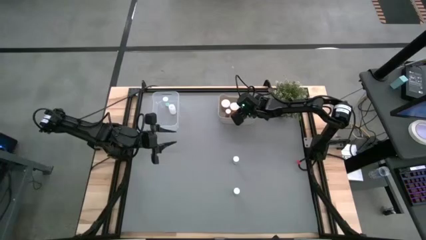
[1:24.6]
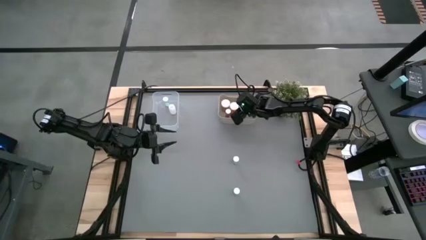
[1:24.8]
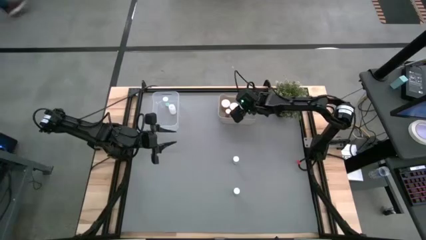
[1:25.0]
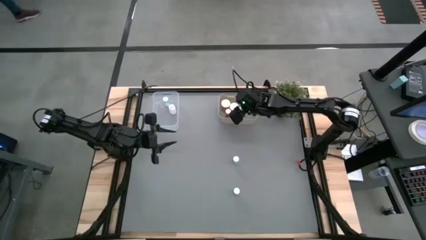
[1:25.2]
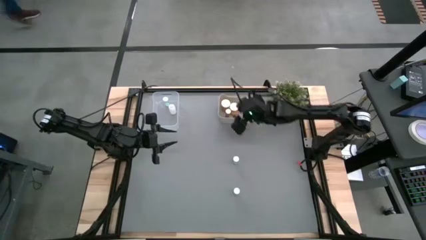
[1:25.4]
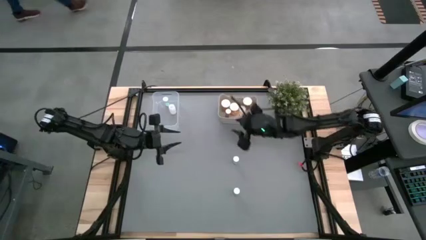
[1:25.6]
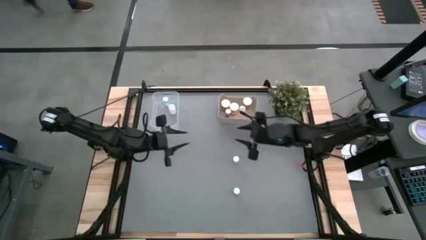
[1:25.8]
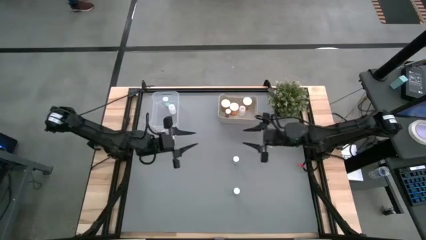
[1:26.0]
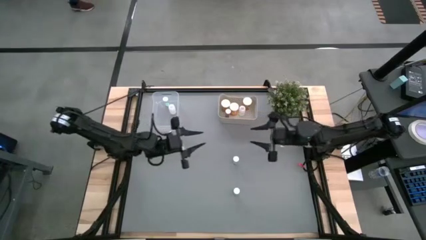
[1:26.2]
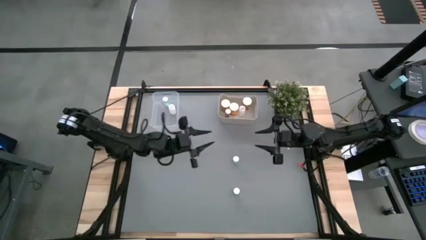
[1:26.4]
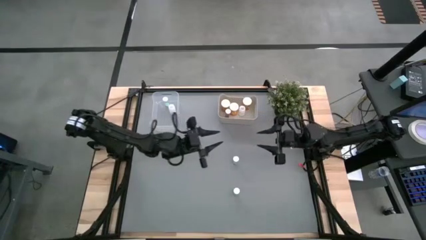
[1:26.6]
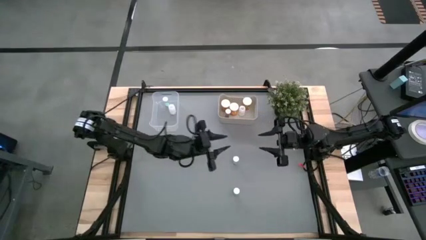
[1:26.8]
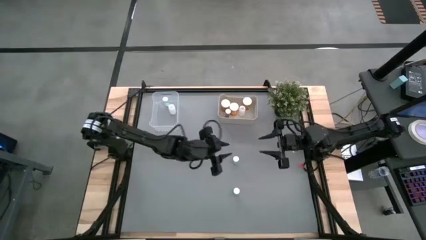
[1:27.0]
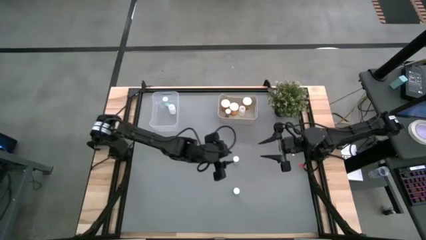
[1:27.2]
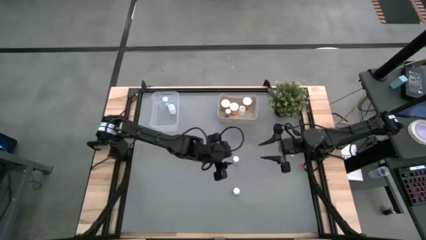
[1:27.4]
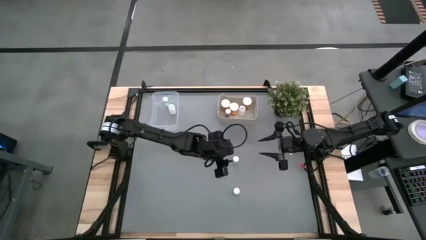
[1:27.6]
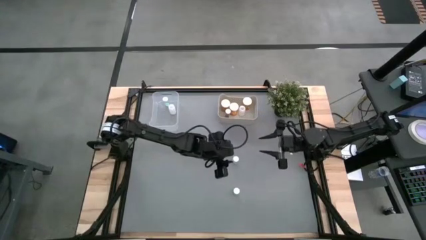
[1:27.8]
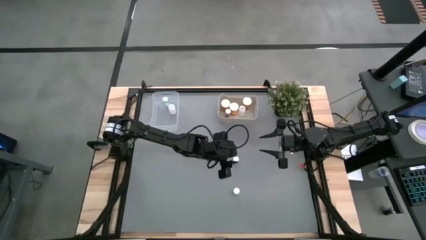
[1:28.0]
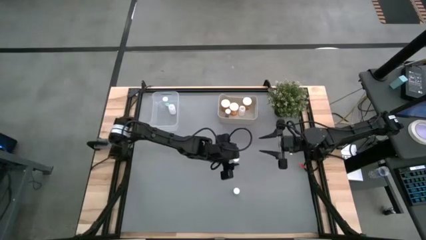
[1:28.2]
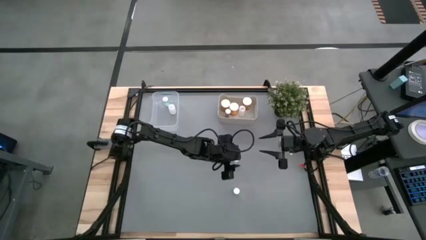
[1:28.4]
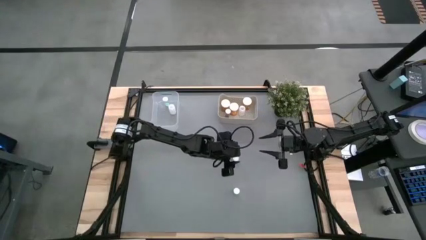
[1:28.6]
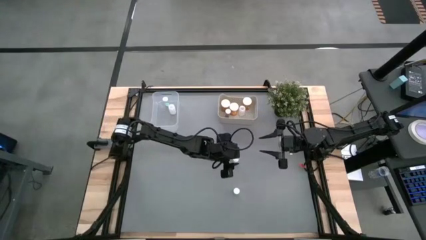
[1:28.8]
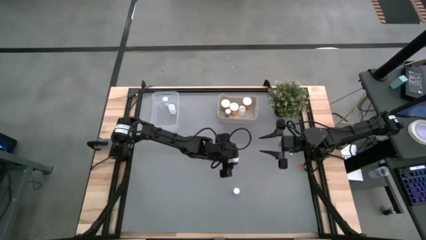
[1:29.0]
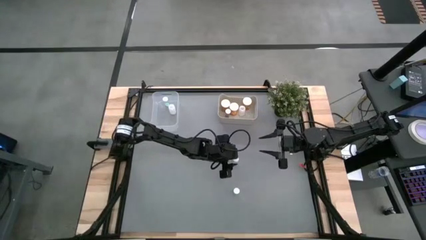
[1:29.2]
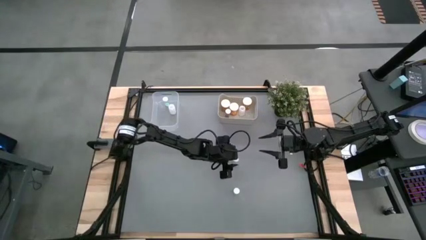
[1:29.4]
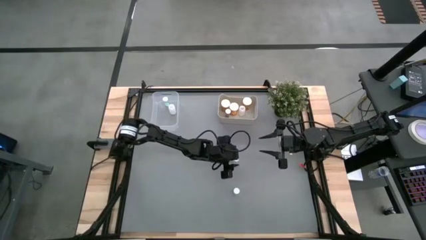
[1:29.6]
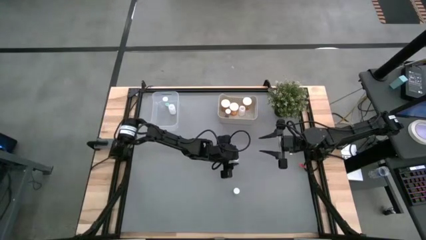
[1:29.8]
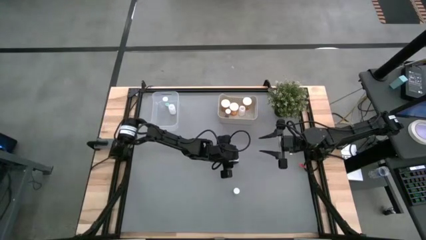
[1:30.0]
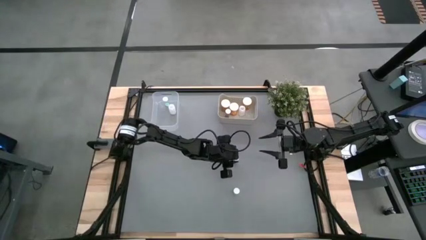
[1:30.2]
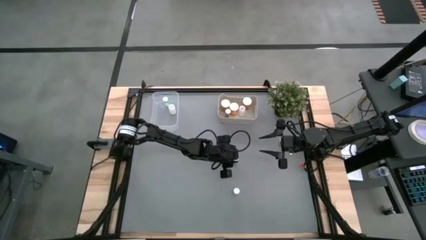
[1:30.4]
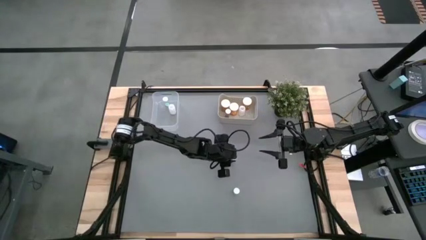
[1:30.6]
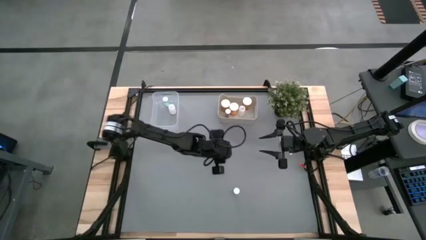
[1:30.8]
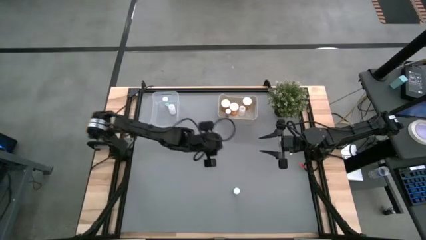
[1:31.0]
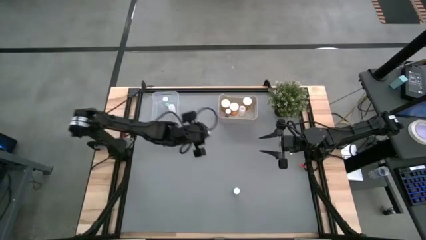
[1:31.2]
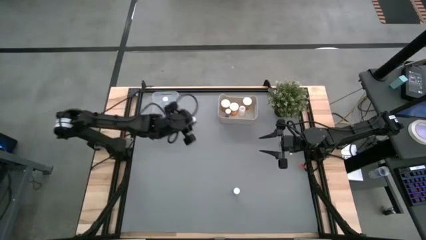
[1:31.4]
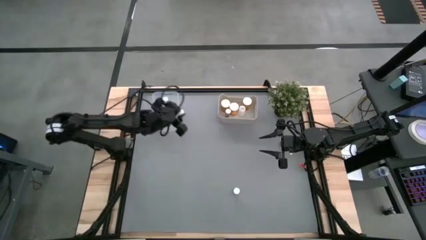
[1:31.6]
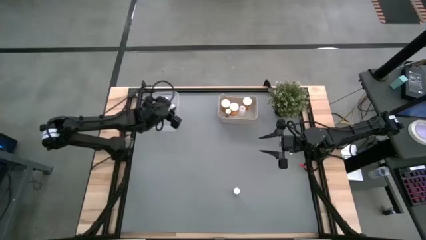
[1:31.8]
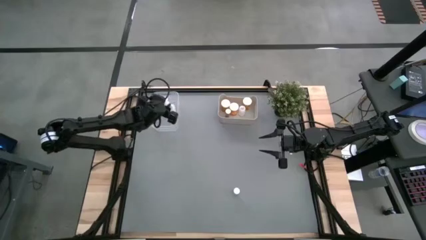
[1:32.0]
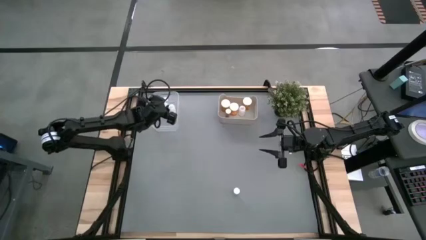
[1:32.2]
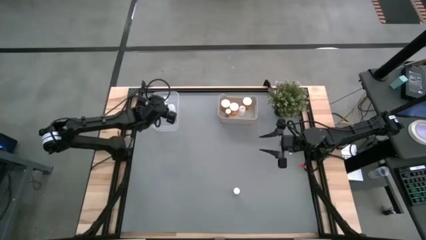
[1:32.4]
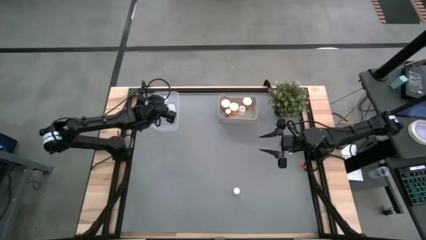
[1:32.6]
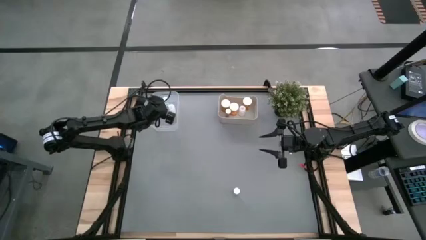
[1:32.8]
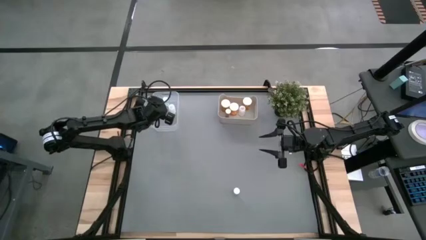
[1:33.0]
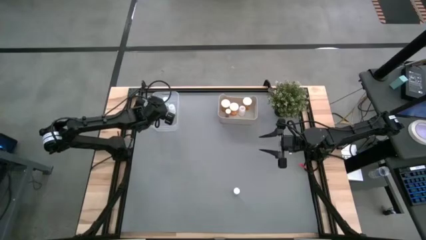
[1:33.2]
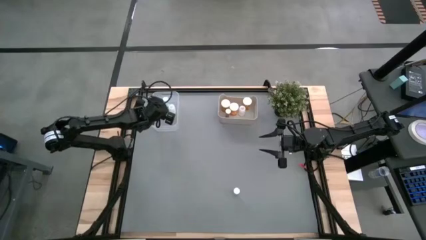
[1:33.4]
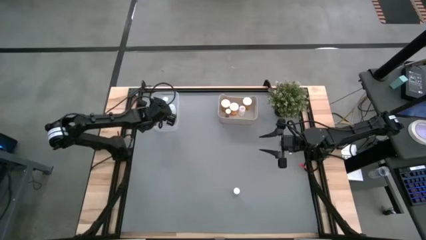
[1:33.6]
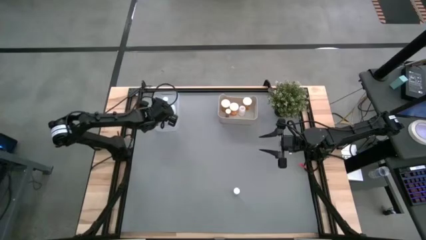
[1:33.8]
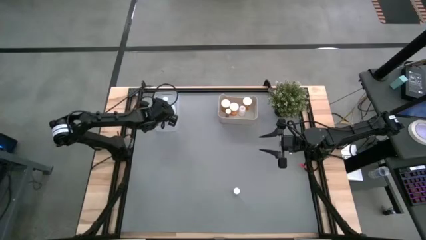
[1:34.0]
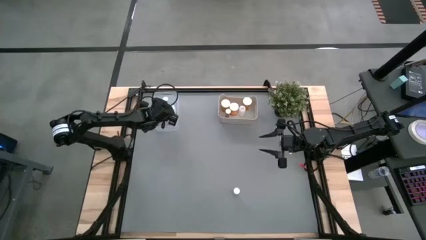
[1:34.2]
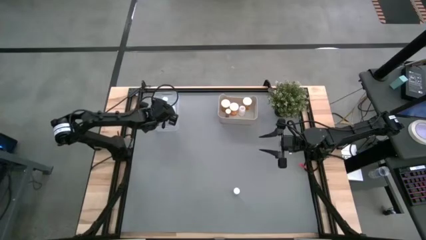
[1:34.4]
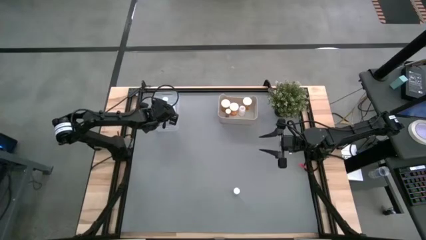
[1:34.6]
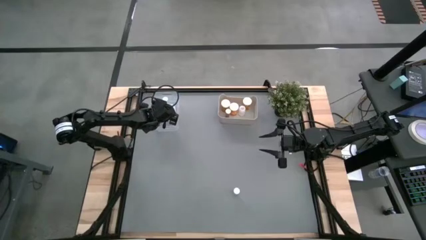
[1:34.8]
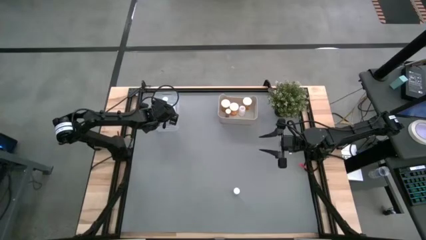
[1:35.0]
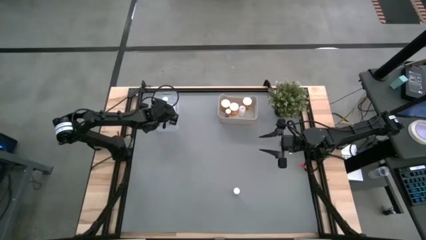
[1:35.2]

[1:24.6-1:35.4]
Task: Pick and place medicine bottles into bin by pill shape (circle, oval)
Put the top blue tablet bottle into the transparent bin

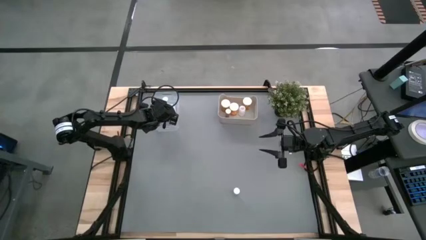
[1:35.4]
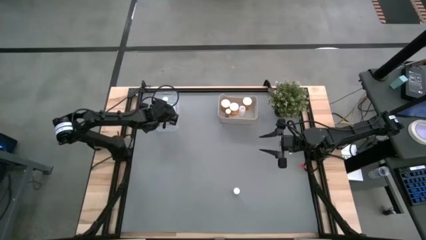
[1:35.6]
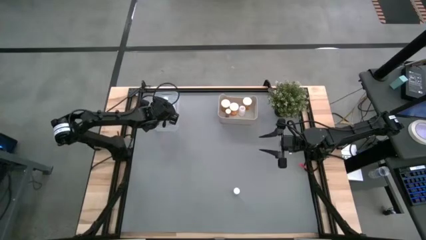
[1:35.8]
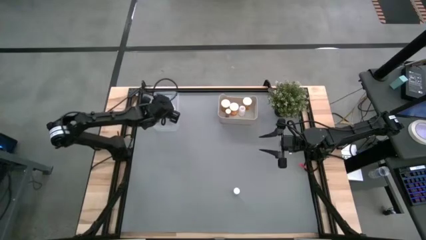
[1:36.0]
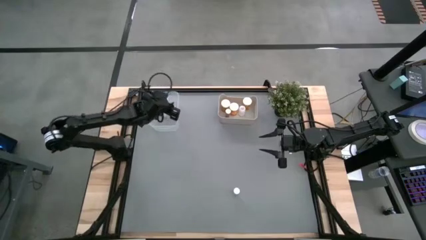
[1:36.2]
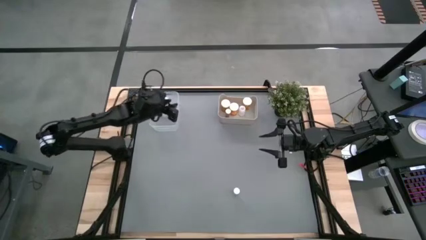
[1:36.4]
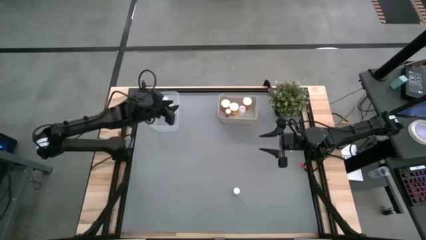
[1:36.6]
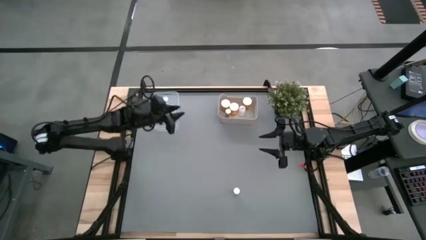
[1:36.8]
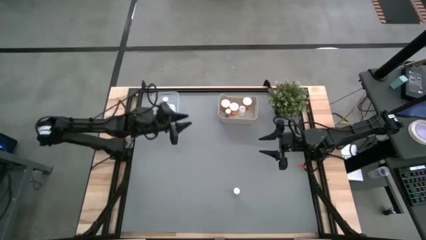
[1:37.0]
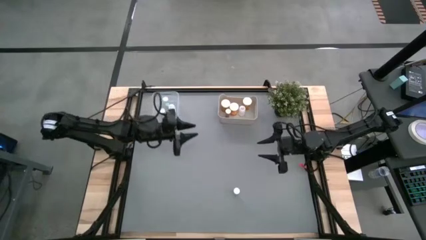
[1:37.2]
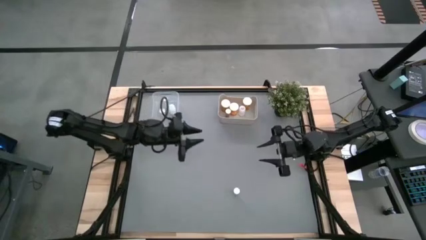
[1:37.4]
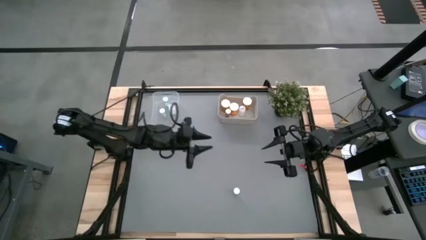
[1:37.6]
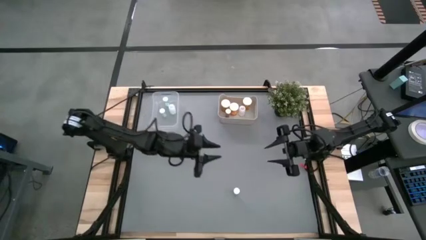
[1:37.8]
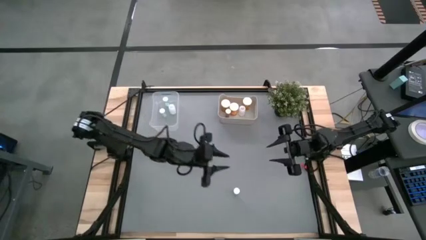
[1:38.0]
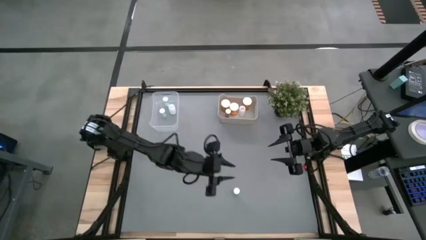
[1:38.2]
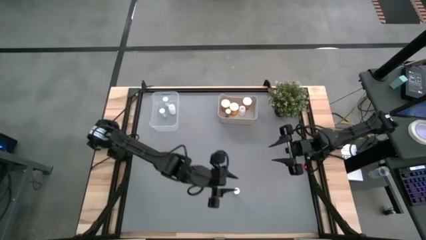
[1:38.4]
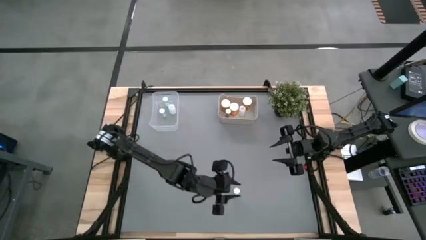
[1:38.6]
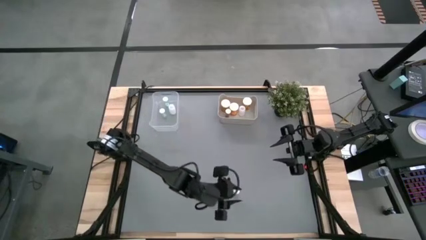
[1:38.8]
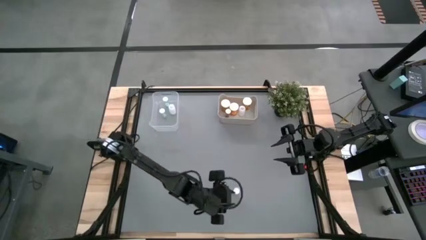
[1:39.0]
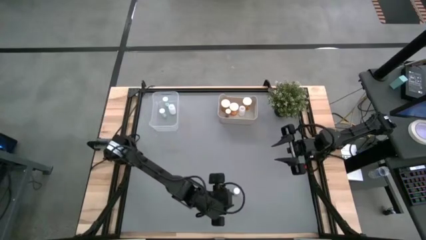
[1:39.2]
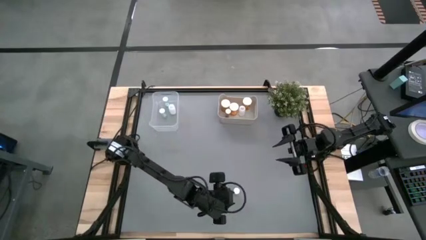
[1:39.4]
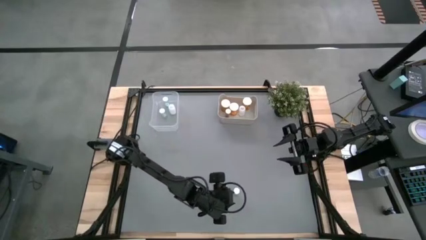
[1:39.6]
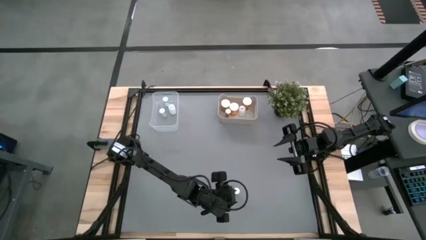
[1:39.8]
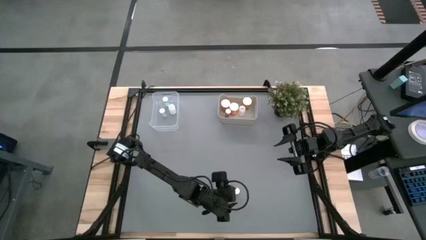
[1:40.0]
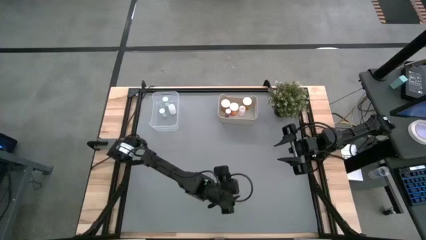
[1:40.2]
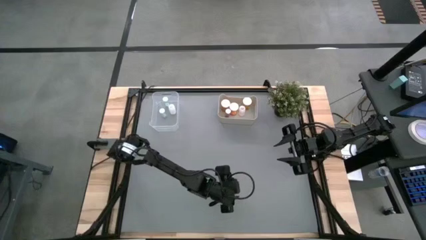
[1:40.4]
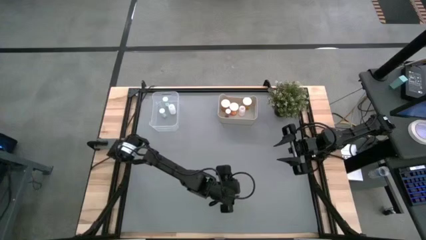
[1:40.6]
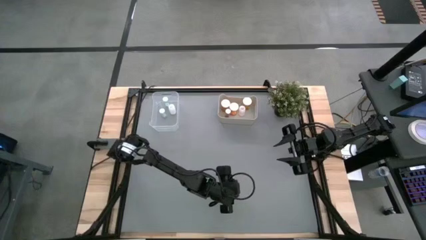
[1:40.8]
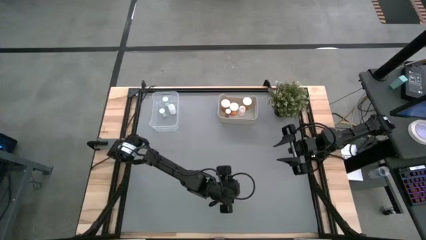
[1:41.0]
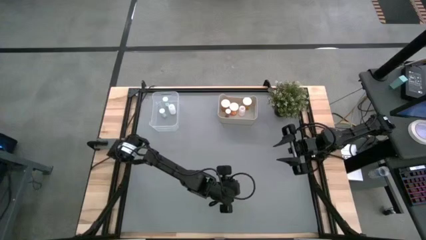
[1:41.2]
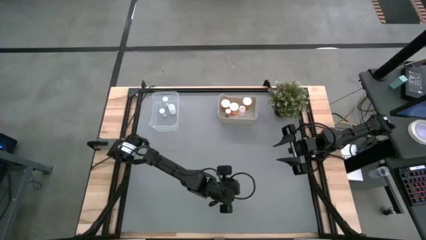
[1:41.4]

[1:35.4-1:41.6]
Put the blue tablet bottle into the transparent bin
